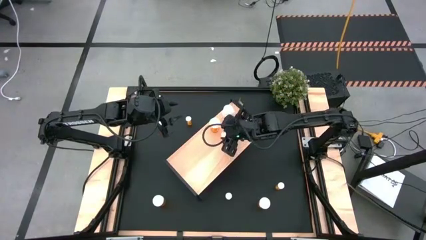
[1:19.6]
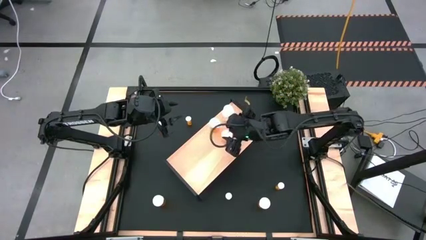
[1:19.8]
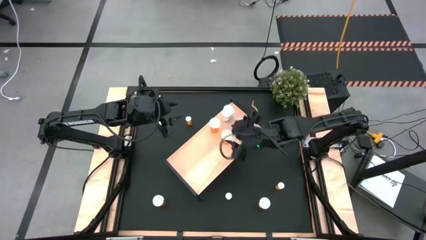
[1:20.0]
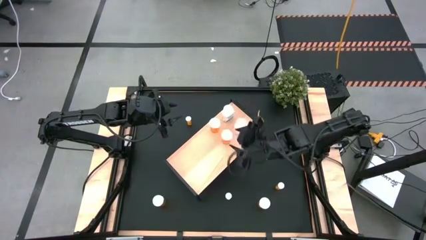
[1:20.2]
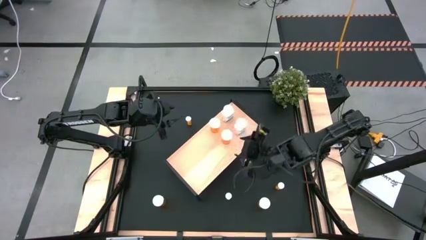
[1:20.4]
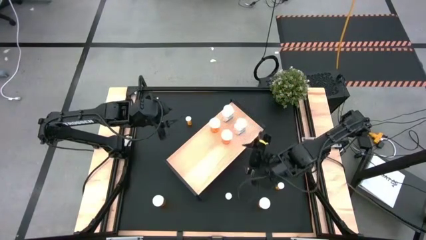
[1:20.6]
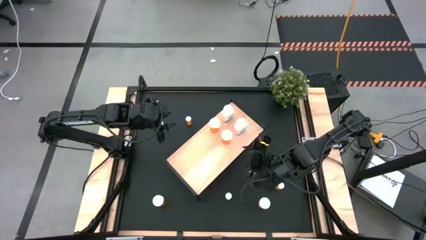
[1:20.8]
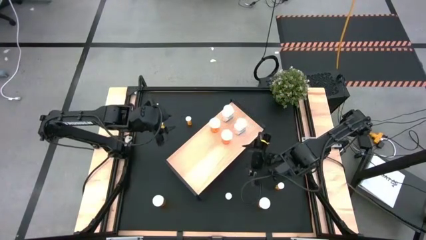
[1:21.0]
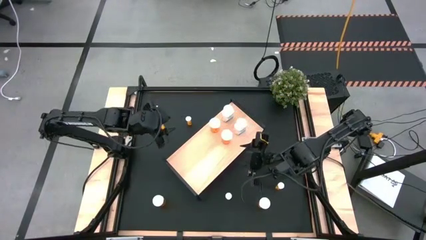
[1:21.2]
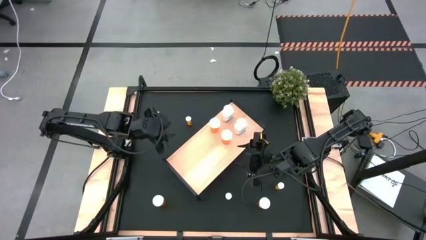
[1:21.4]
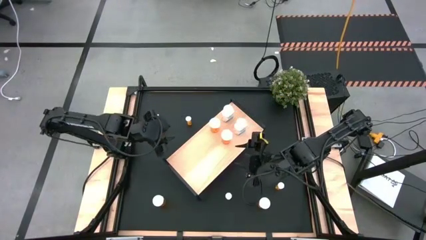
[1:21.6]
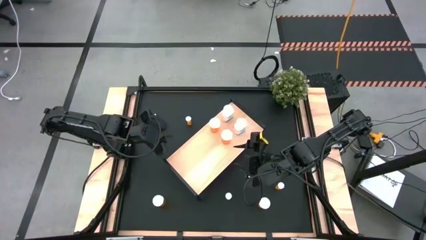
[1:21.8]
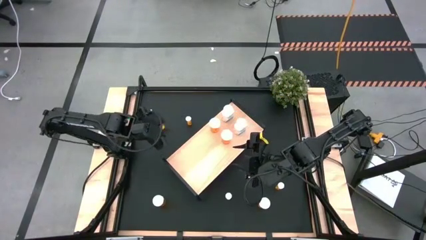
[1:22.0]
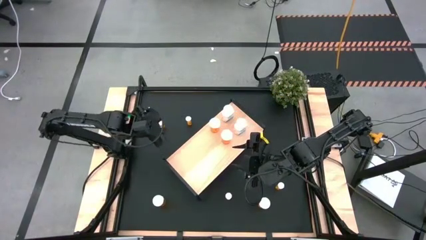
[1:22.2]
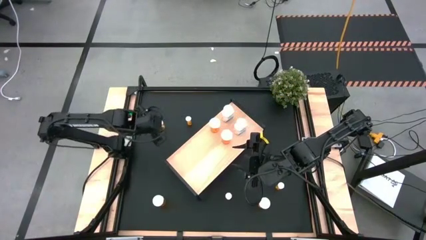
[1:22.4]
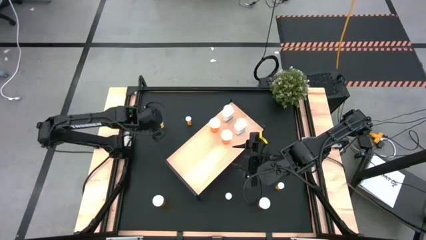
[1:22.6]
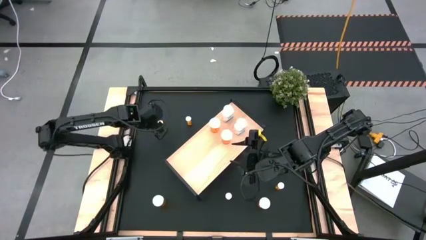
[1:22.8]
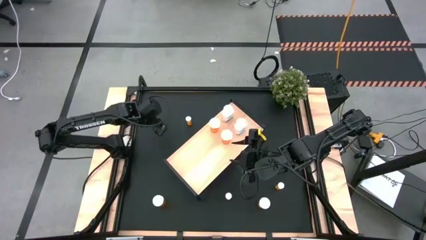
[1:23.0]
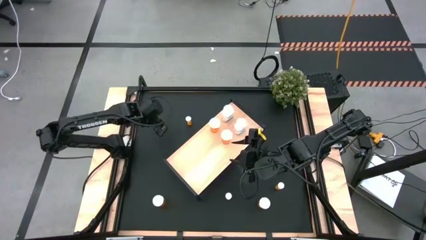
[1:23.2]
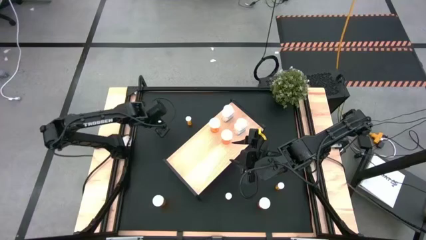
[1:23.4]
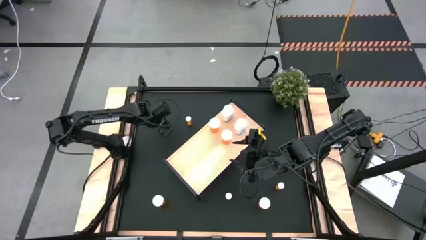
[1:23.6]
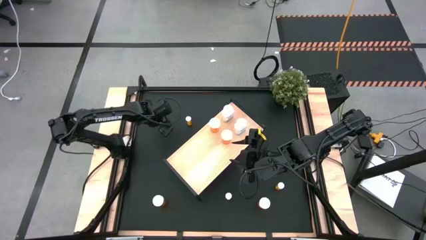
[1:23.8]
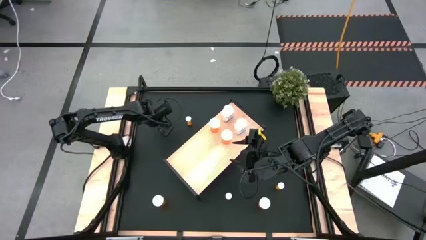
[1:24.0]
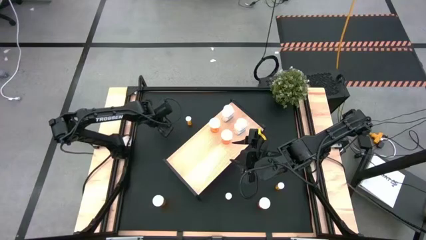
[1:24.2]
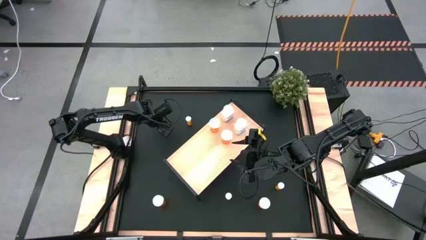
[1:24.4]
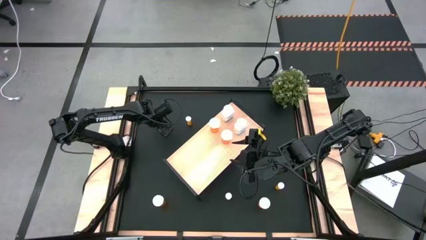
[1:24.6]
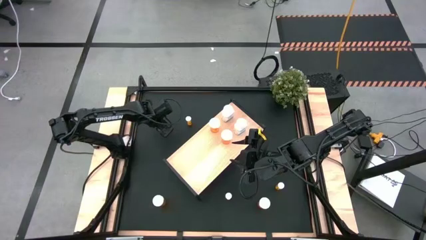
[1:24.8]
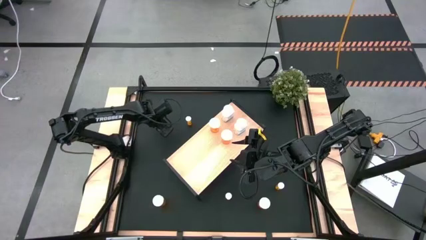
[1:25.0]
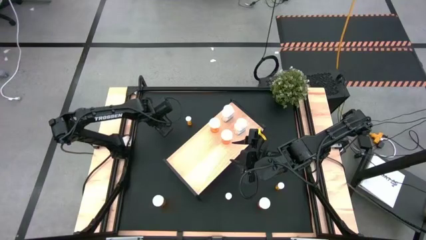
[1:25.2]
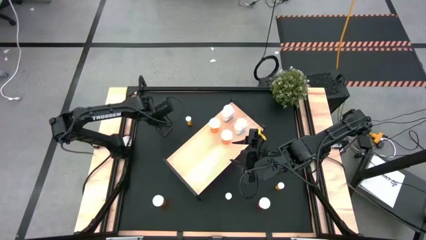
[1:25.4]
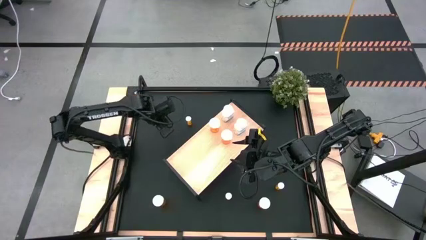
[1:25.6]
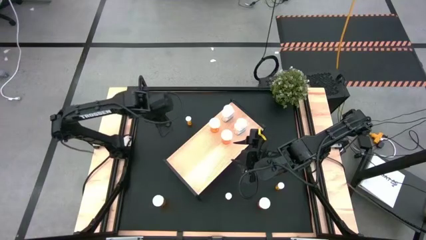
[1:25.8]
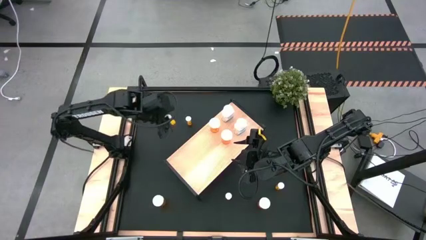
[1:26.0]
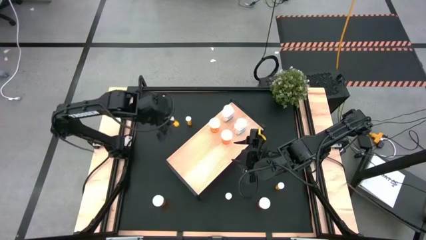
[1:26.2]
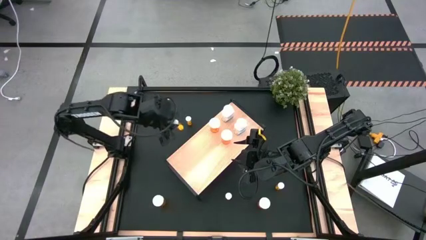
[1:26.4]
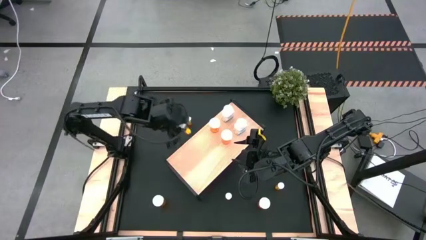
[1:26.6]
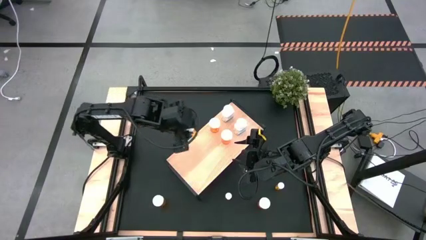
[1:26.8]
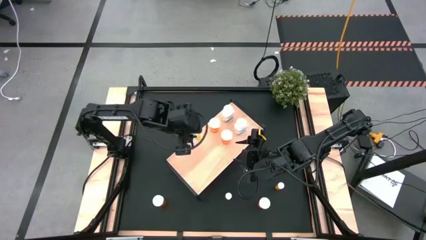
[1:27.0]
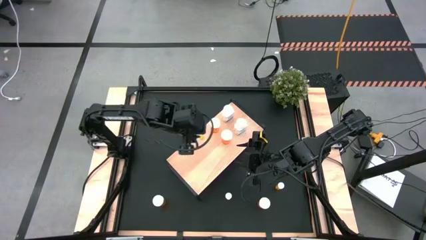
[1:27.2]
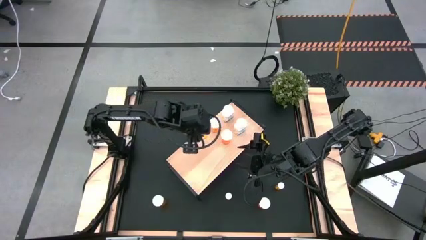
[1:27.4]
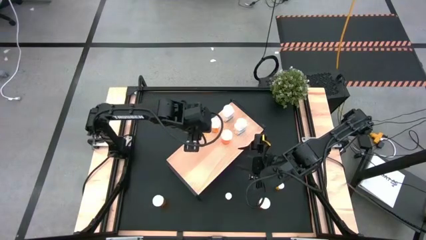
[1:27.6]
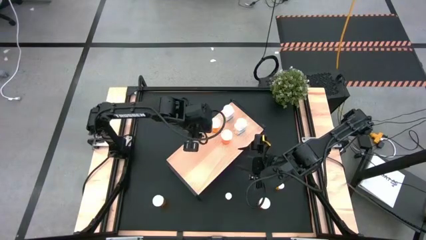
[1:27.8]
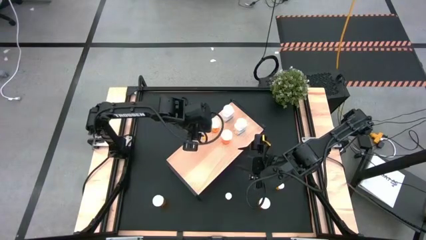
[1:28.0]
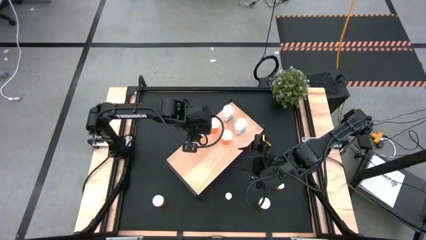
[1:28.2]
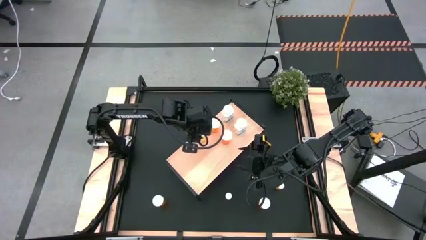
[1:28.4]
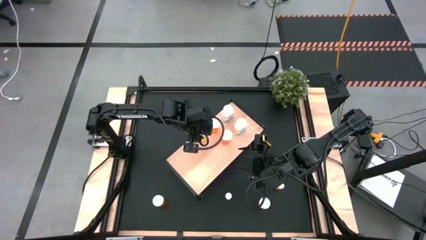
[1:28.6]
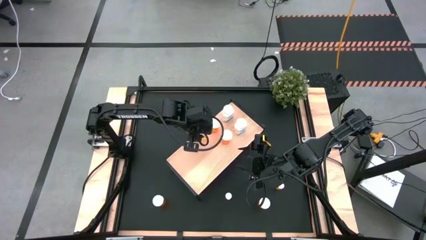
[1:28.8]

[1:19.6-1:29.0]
Task: Pick and place medicine bottles onto shelf by color
Put the small orange pill bottle on the shelf

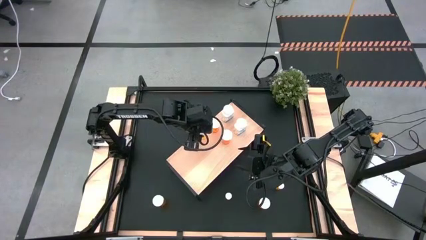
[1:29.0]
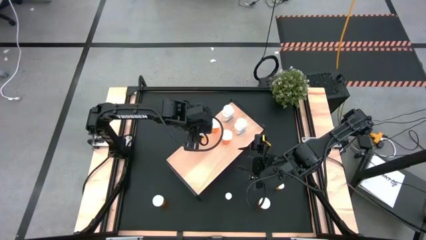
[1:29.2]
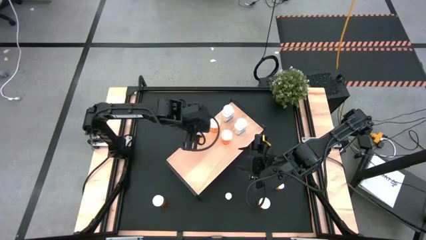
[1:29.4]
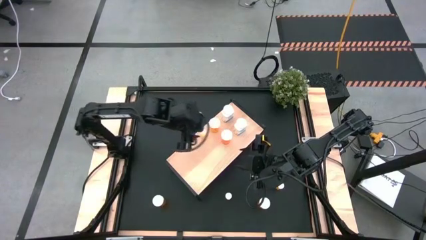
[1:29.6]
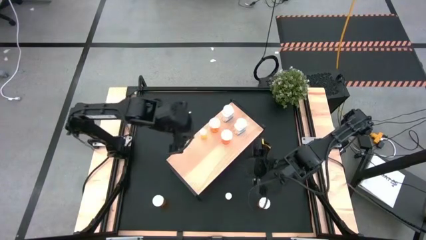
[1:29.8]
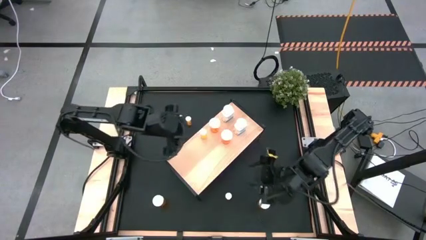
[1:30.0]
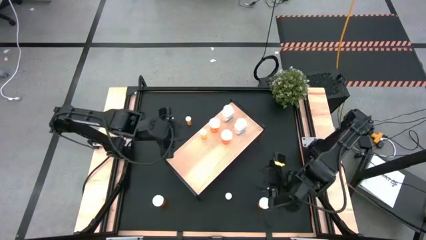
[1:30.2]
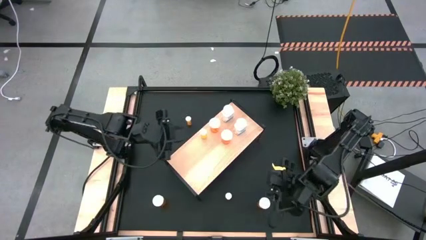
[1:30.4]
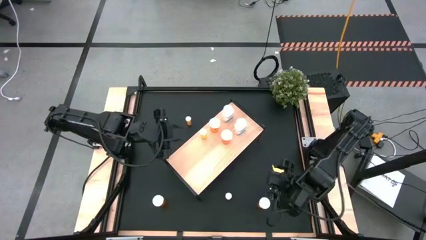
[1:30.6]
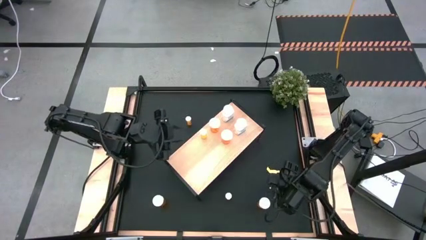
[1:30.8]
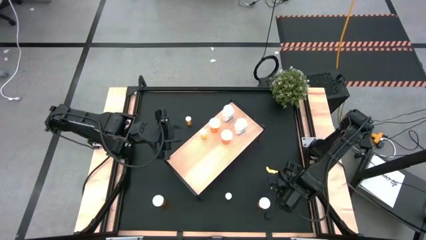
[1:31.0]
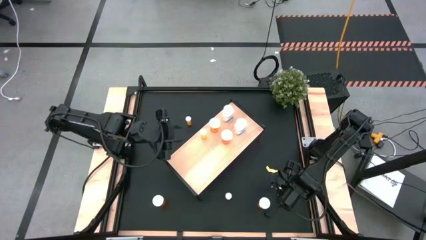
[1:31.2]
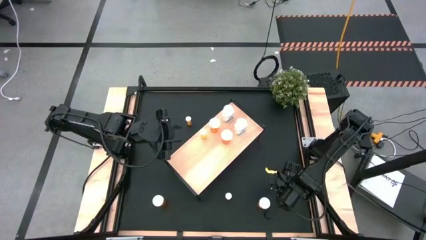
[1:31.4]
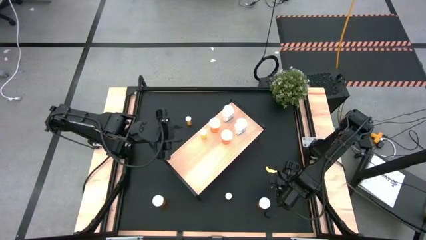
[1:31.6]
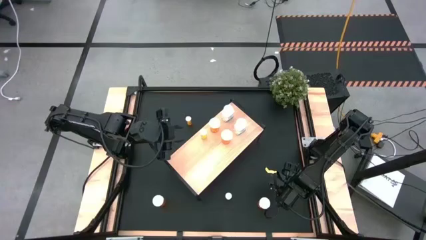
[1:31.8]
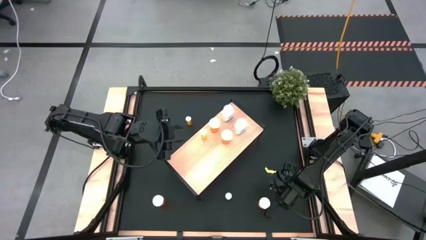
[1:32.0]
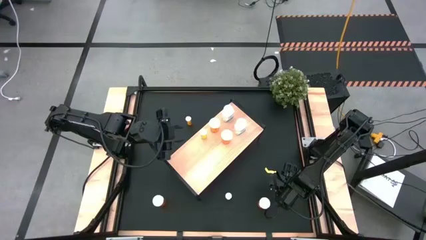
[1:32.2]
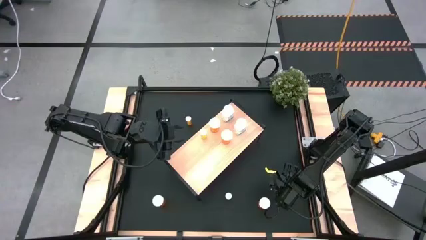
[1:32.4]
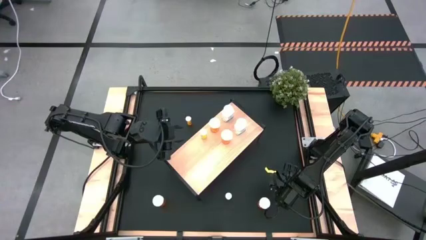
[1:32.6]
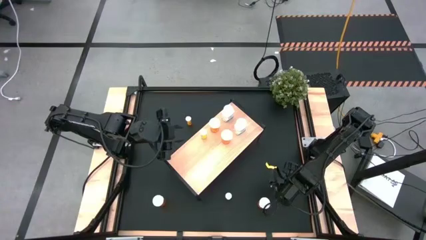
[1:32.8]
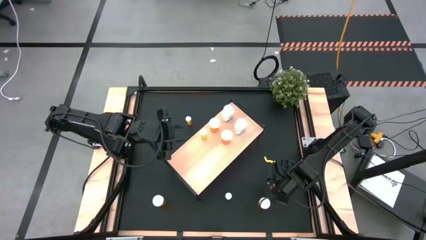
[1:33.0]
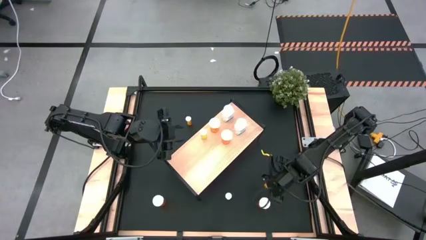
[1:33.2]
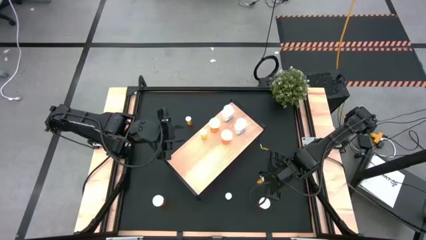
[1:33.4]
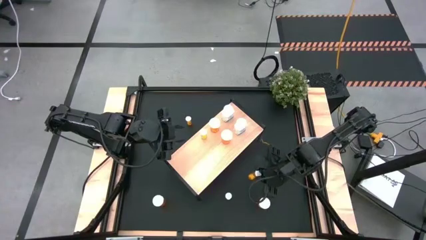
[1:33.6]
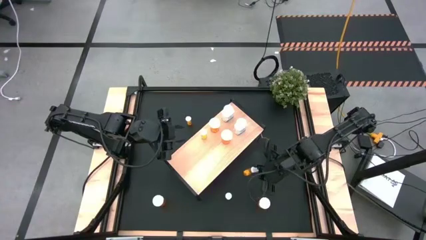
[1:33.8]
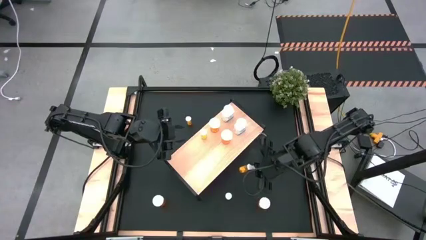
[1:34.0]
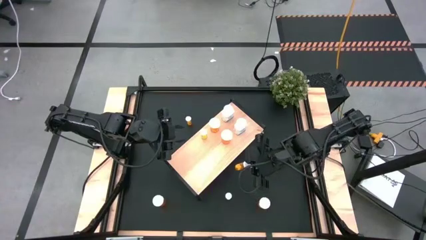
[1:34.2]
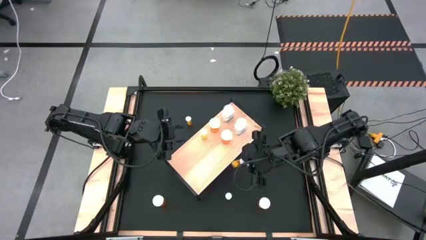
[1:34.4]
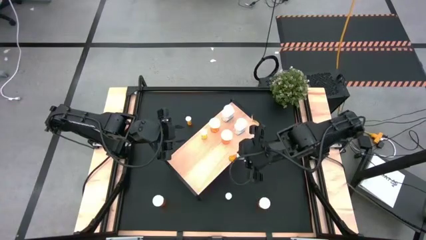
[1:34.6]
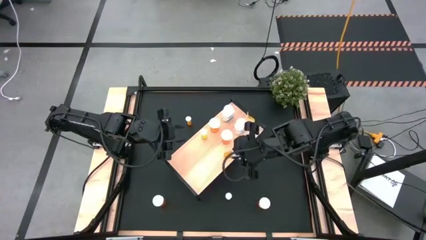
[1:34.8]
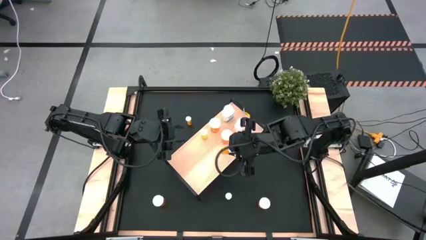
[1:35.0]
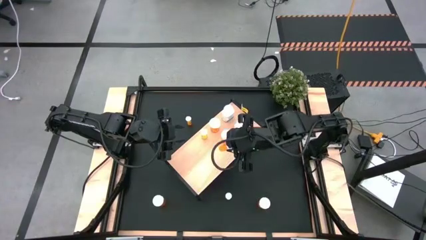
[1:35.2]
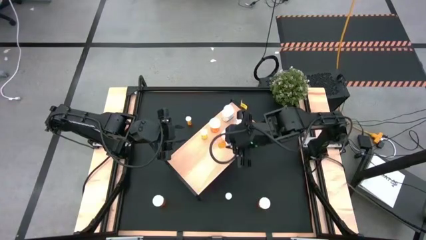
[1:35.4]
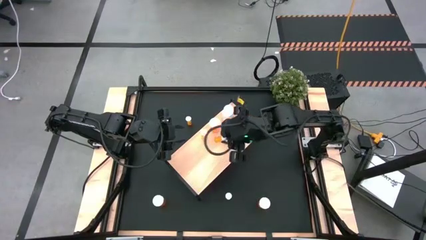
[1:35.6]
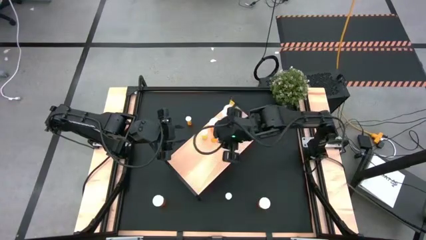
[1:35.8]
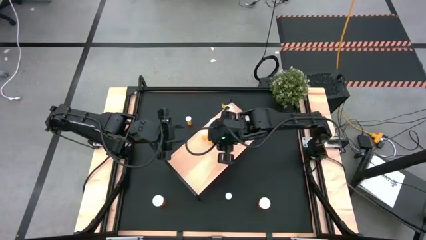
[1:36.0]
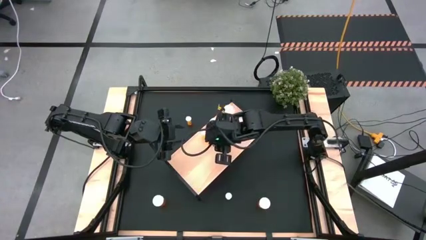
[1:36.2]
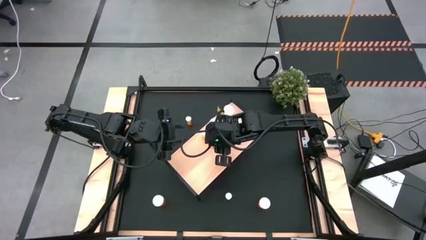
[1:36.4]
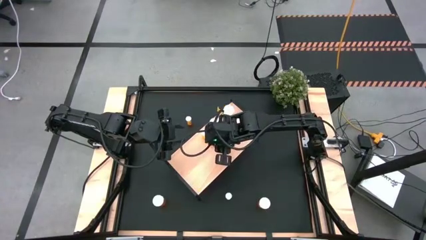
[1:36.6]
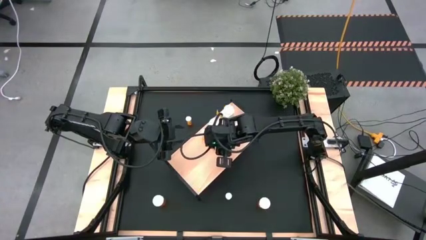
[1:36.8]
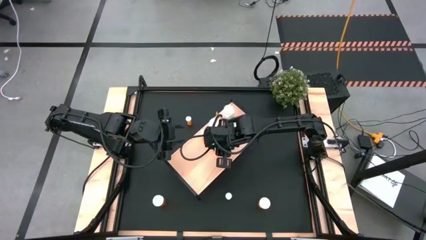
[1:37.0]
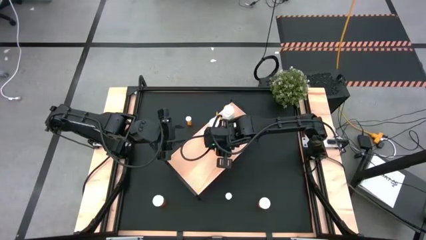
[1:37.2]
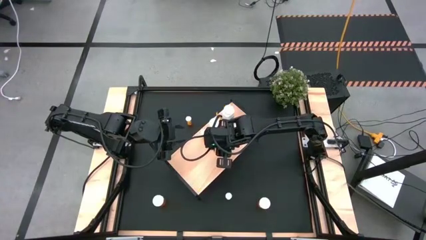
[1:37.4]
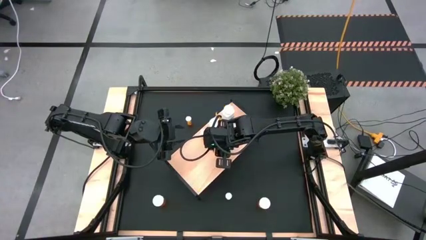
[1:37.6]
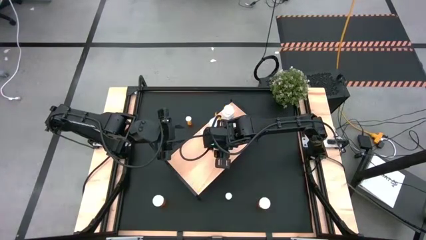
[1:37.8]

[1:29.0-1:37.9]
Put the small orange pill bottle on the shelf
